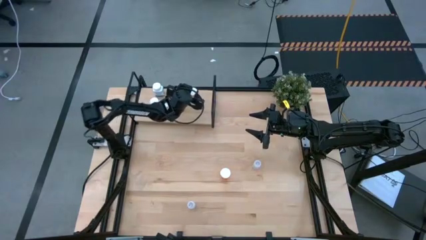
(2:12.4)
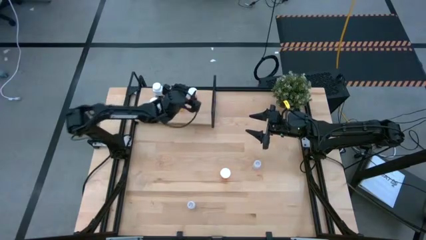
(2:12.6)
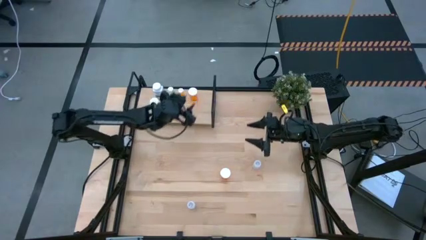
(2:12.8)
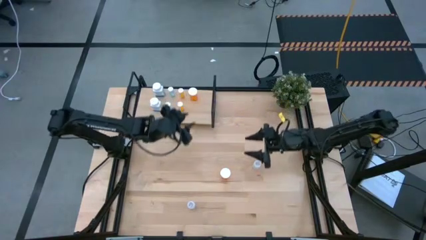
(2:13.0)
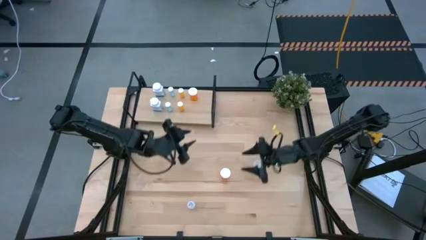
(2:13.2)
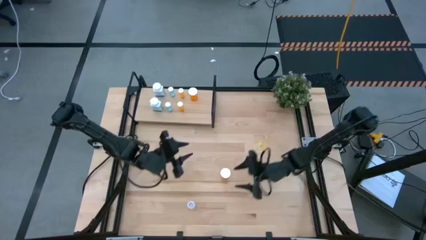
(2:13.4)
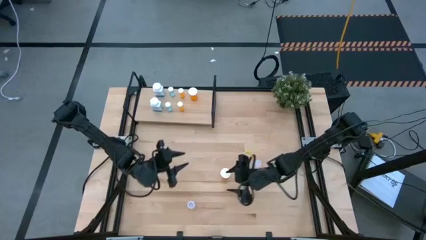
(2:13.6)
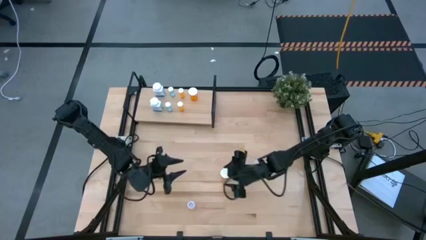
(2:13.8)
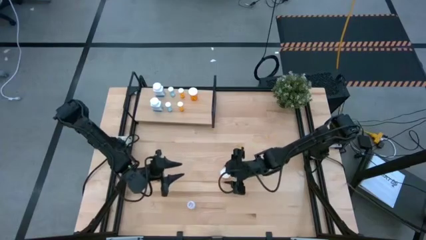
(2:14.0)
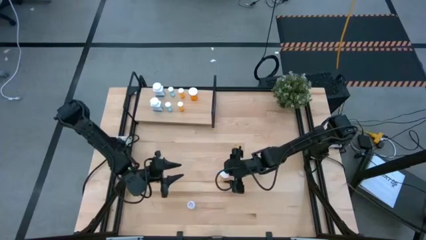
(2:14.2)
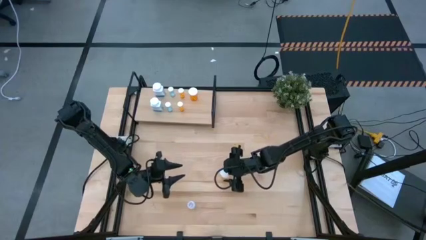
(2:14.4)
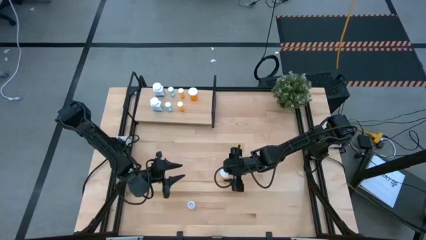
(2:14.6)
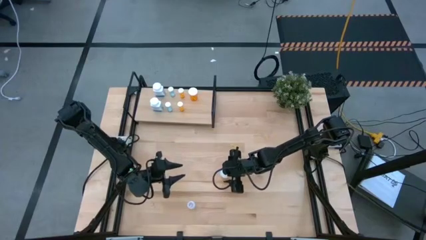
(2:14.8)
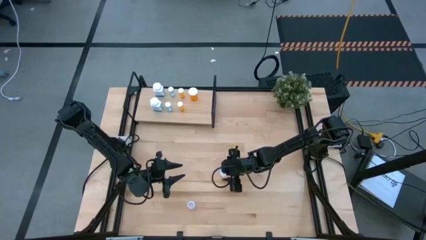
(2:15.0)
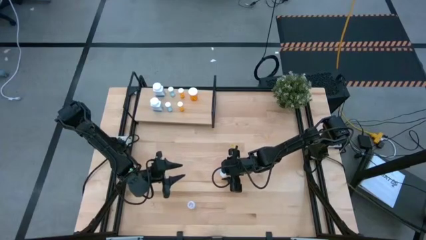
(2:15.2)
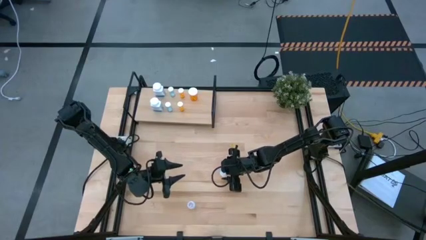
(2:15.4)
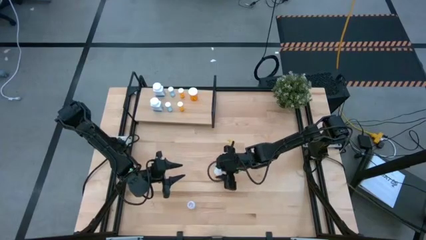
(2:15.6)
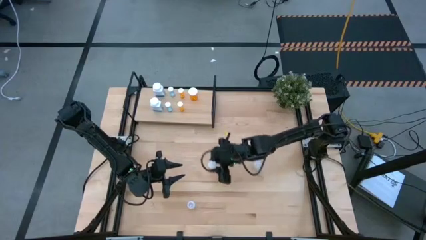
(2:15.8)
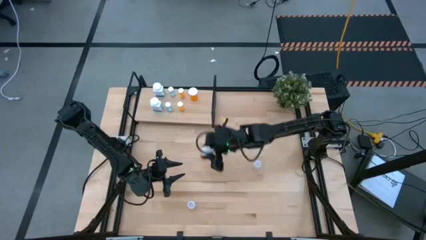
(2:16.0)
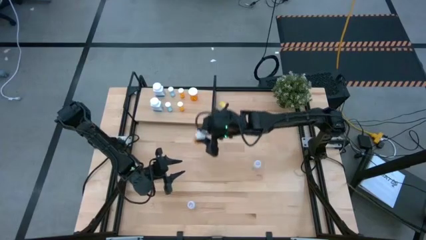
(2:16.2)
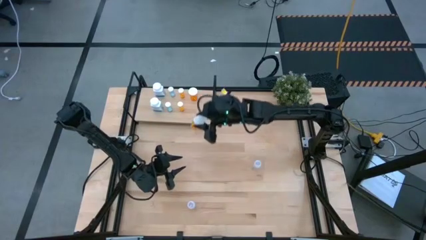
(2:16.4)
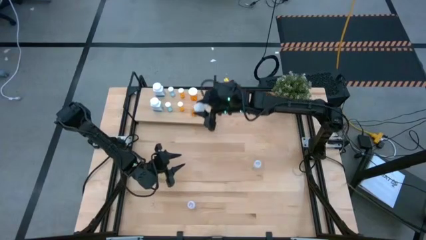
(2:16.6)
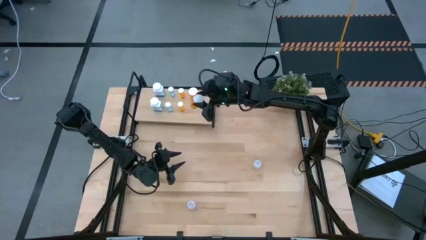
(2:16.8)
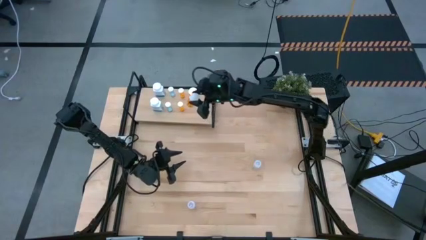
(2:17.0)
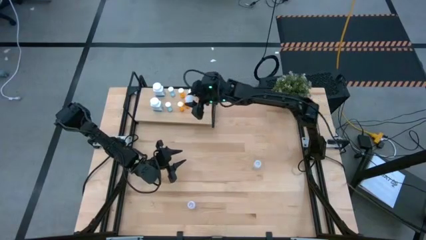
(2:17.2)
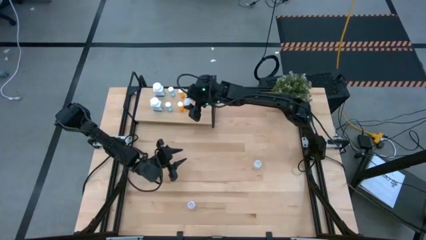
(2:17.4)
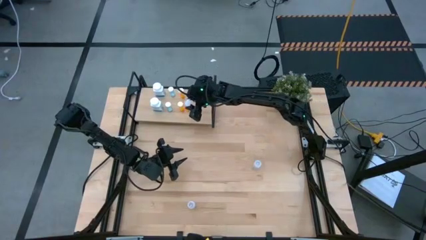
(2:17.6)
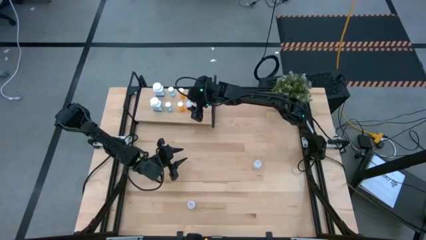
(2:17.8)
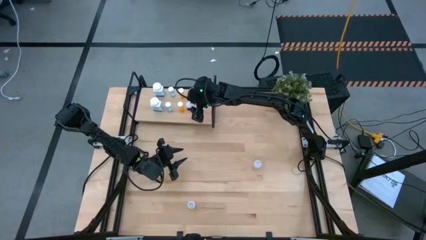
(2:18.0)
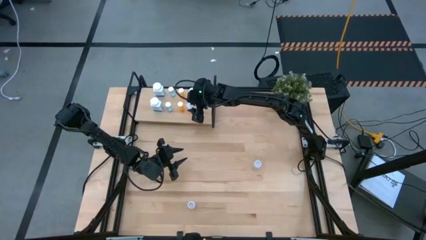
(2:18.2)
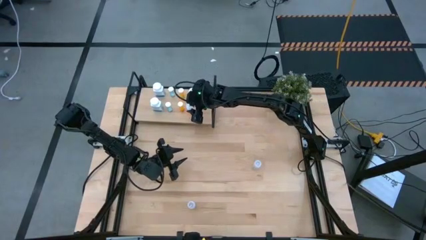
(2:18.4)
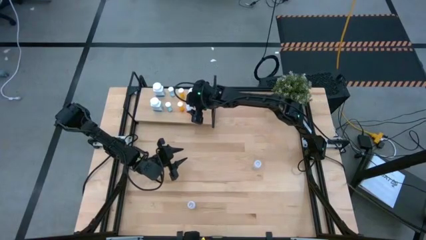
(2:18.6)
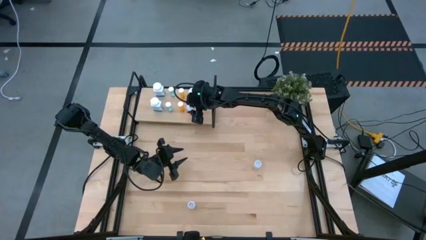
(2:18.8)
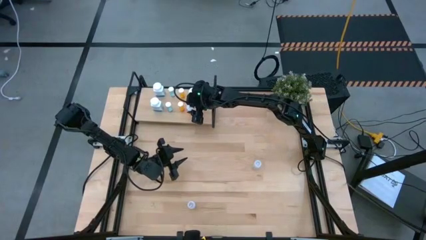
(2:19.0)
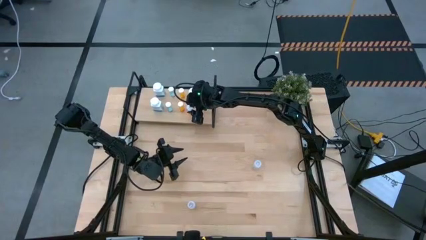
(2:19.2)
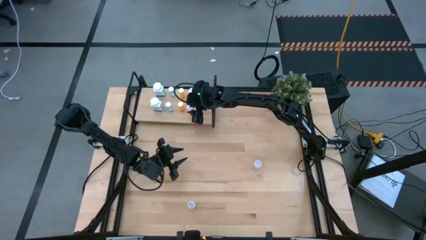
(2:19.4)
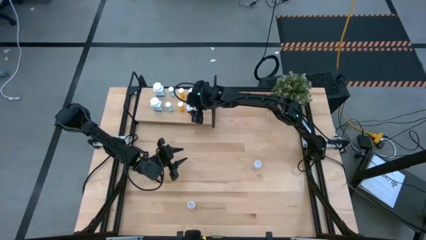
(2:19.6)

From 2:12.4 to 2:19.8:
Task: Pick and place medicine bottles onto shelf by color
Put the large orange pill bottle aligned with the other large orange pill bottle on the shelf

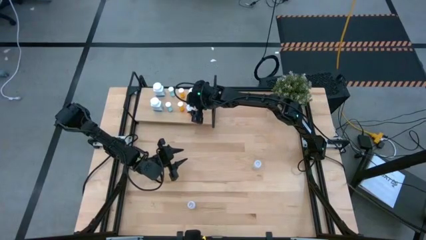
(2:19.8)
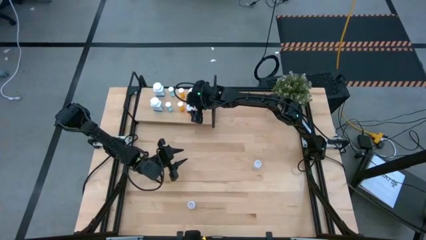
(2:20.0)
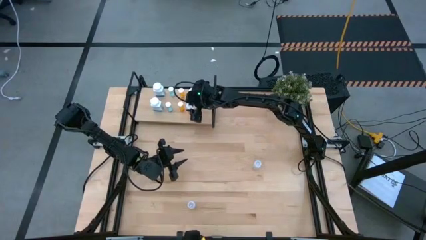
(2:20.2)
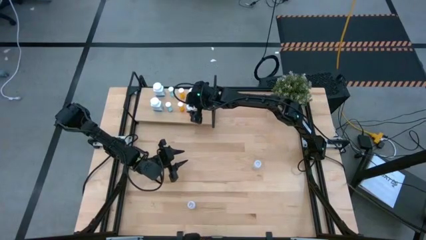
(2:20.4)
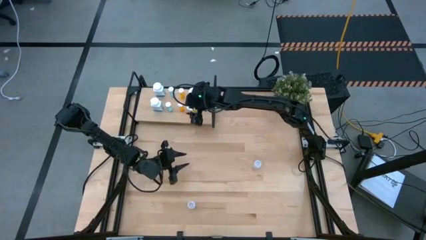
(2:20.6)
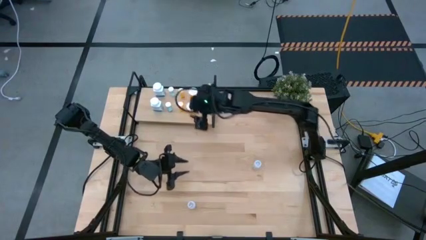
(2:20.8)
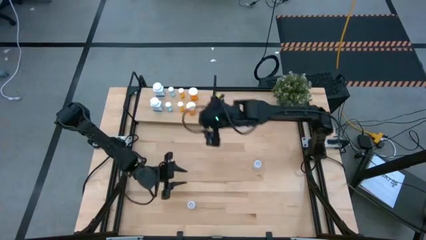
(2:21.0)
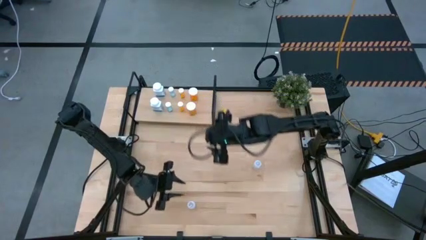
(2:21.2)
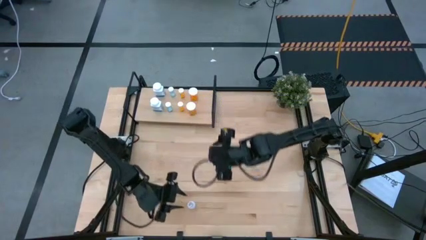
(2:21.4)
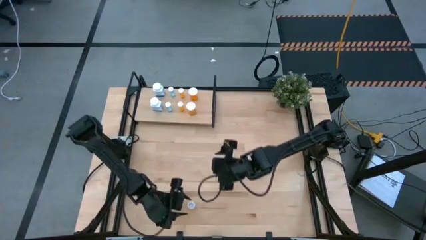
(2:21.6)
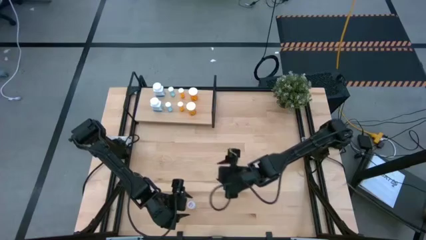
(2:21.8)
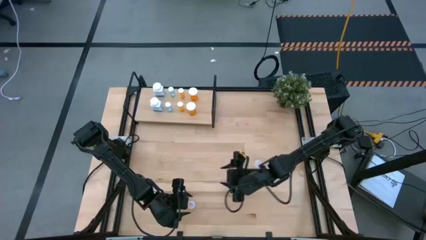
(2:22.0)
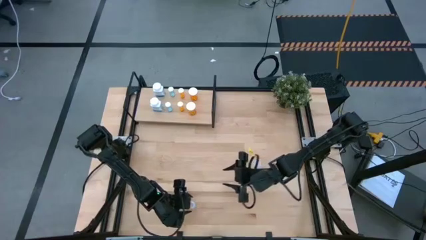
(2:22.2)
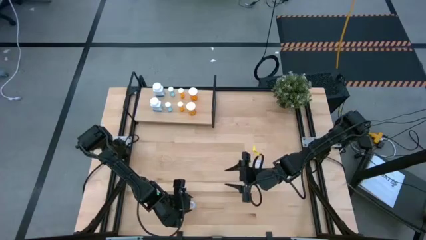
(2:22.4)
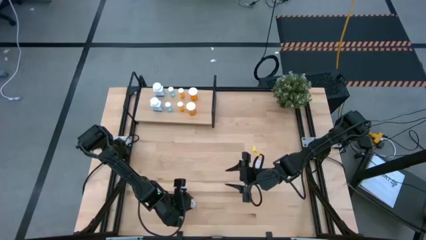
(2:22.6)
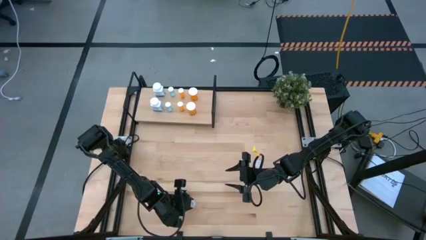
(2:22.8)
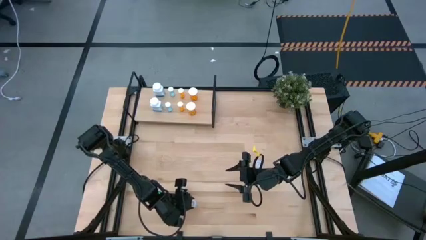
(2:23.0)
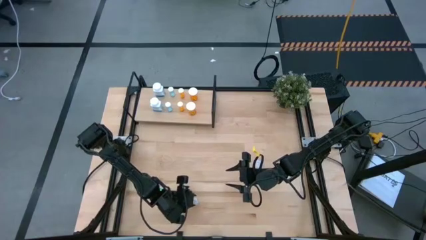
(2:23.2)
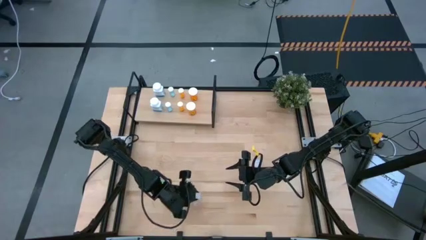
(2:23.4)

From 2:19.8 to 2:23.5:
Put the bottom transparent pill bottle on the shelf

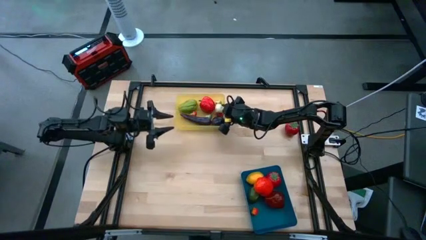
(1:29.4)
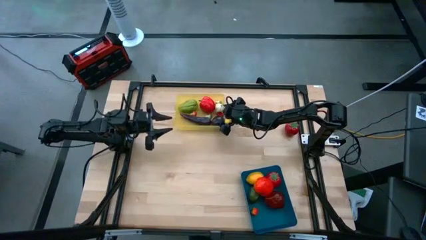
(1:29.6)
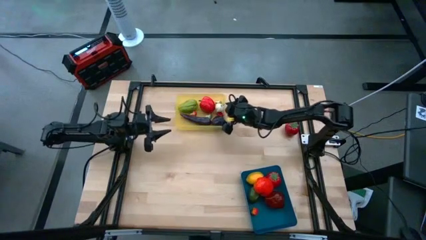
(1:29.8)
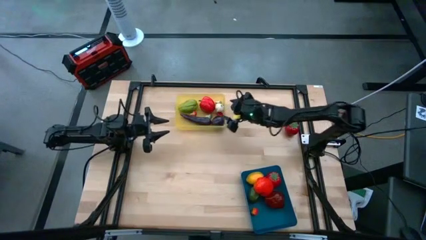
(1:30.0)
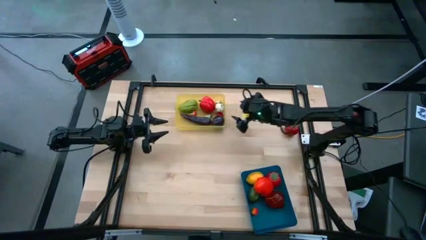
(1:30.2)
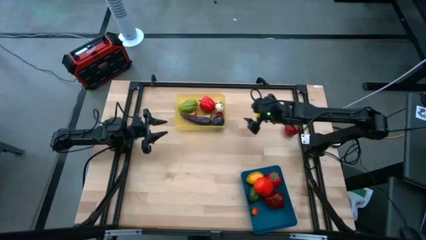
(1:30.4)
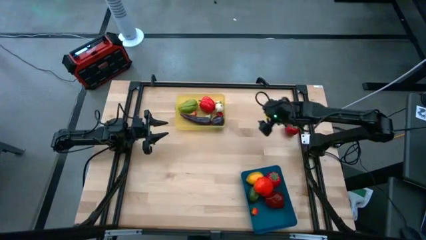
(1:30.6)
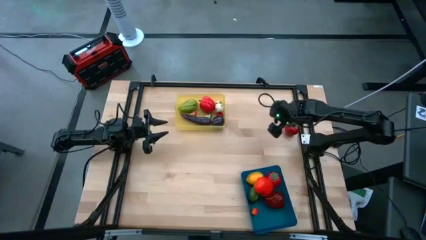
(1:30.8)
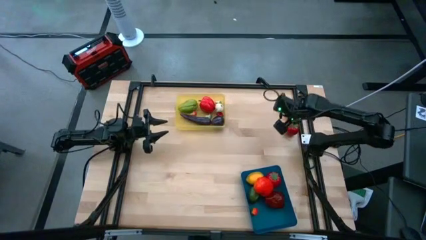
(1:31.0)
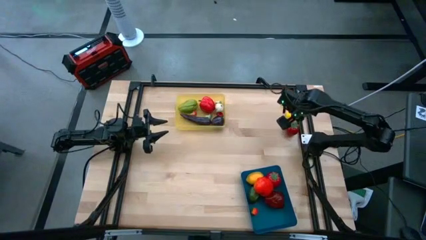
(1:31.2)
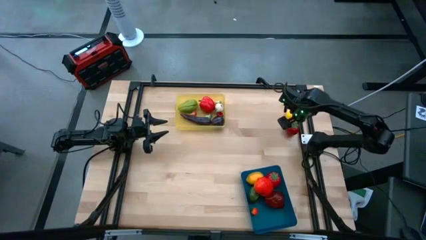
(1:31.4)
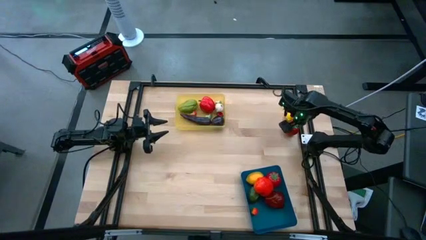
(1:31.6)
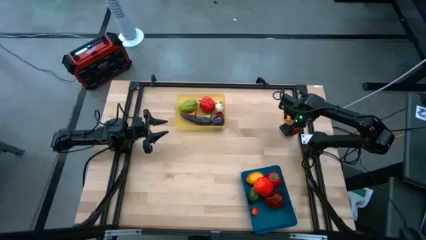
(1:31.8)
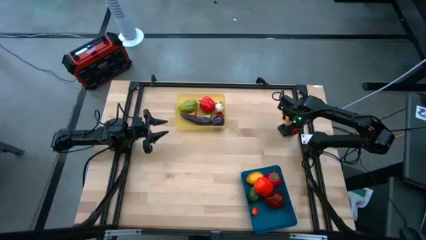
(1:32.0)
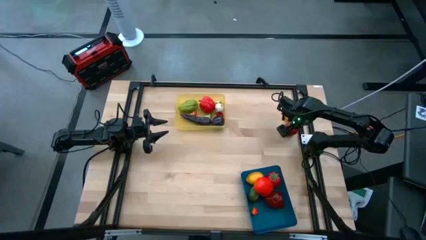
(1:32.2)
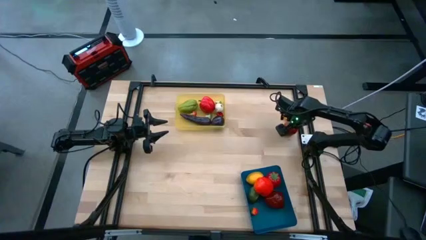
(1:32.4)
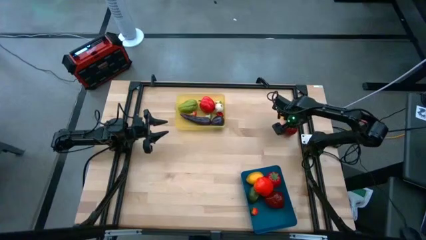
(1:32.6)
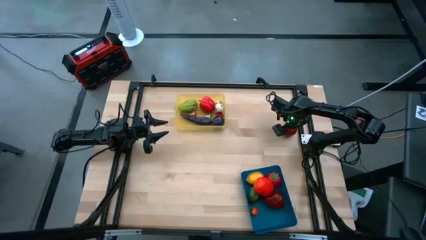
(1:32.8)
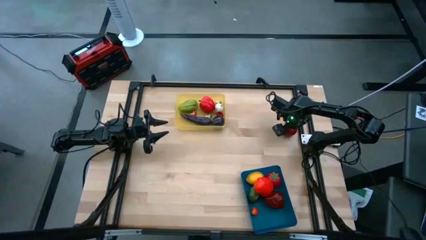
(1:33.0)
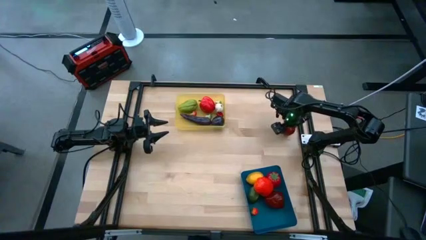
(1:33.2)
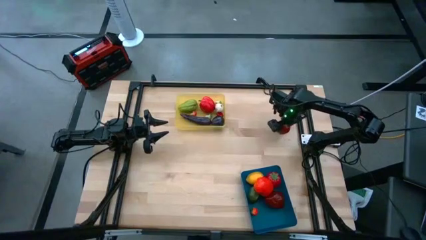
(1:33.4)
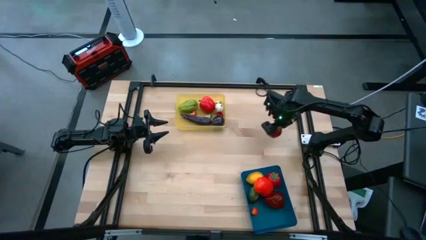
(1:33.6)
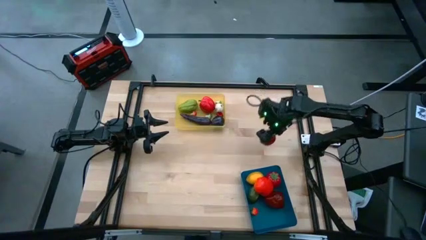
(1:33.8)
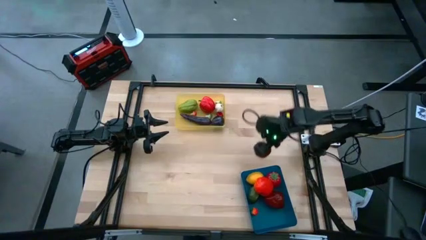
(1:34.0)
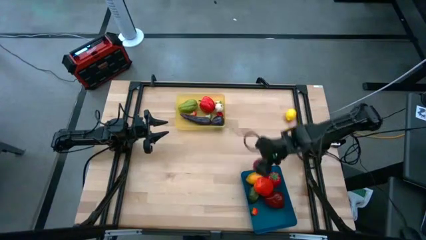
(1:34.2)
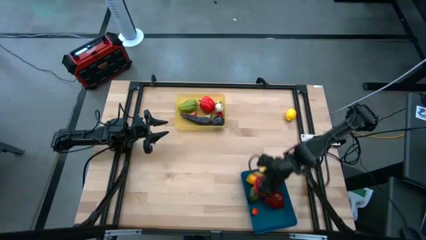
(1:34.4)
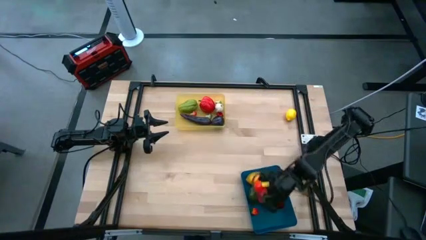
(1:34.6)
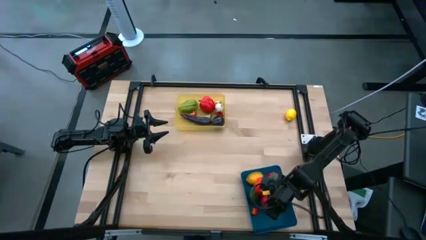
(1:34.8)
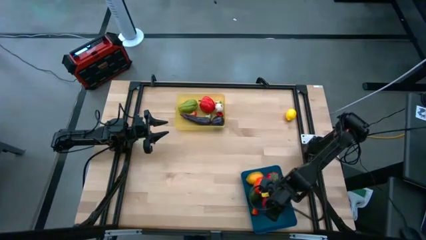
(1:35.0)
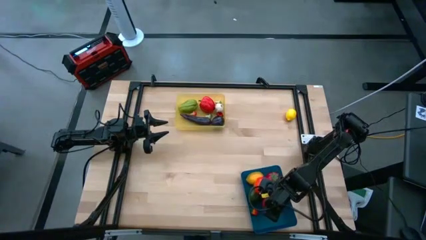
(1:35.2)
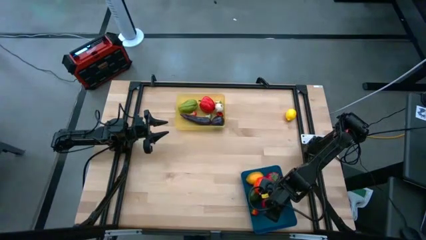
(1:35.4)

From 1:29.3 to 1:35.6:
Task: Sort produce into baskets
Put the red tomato into the blue bin
